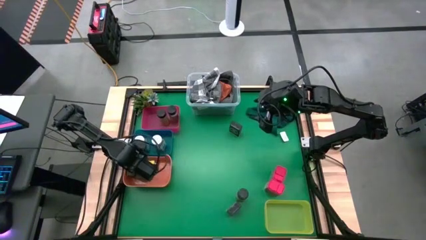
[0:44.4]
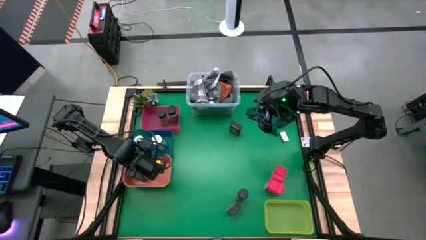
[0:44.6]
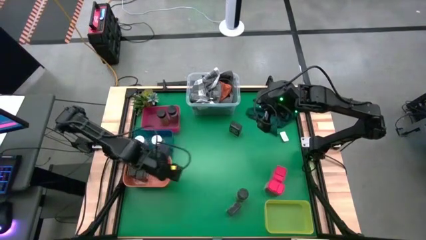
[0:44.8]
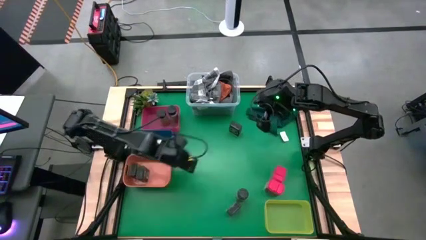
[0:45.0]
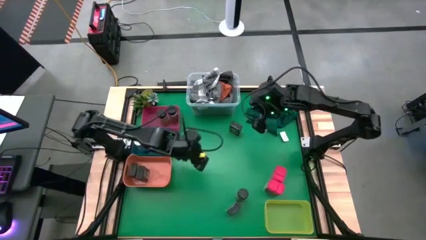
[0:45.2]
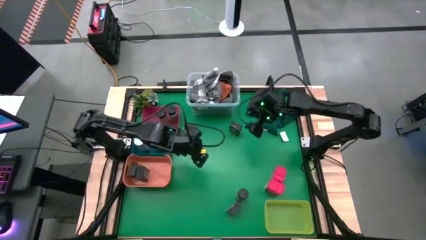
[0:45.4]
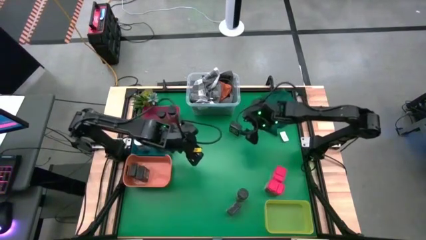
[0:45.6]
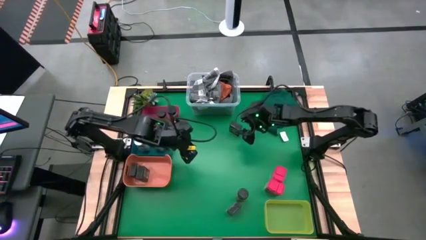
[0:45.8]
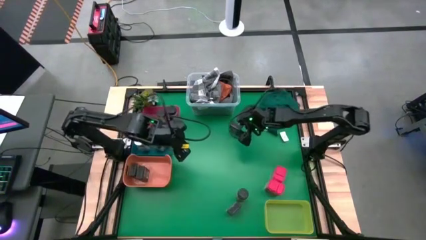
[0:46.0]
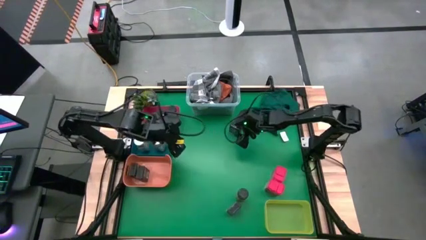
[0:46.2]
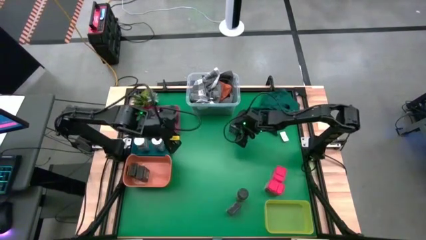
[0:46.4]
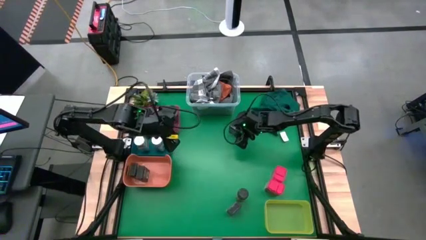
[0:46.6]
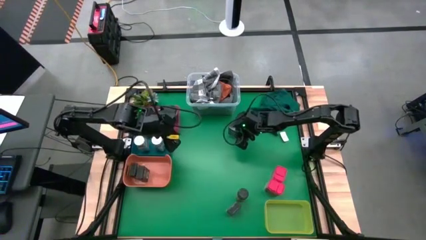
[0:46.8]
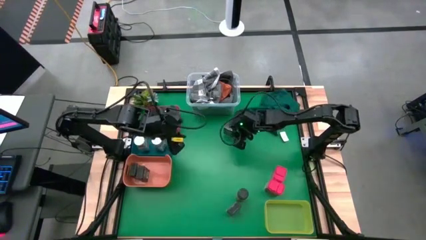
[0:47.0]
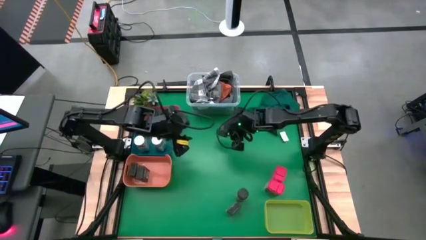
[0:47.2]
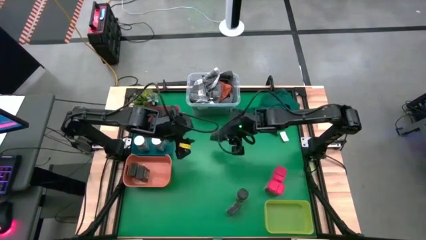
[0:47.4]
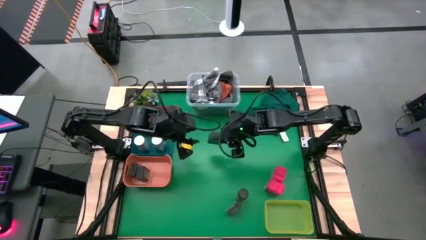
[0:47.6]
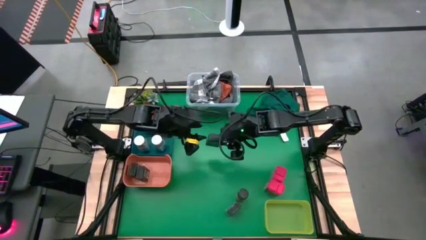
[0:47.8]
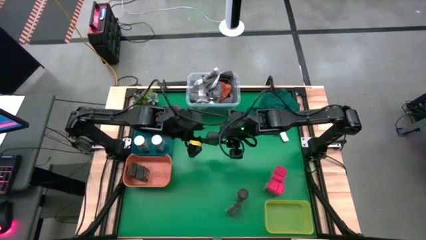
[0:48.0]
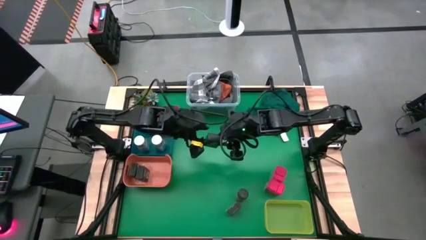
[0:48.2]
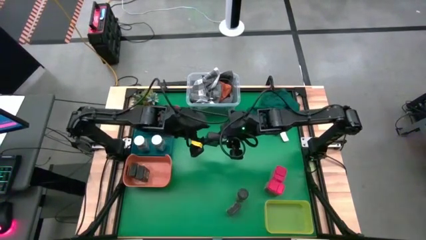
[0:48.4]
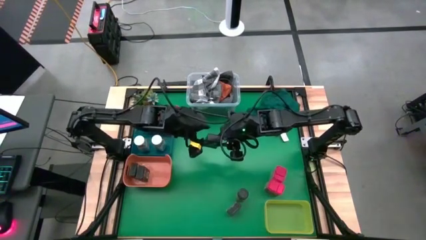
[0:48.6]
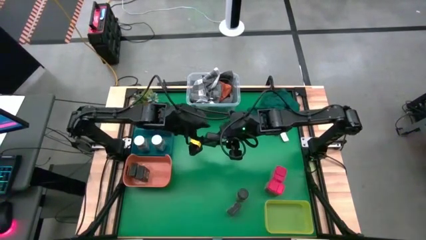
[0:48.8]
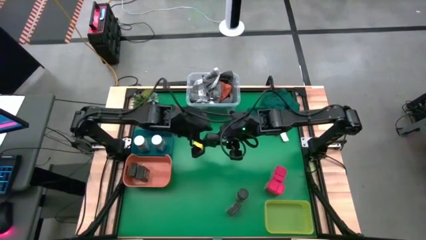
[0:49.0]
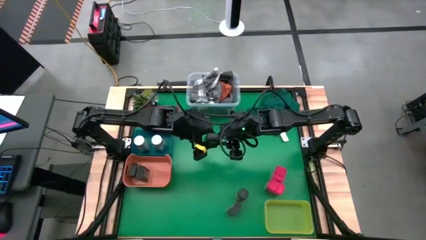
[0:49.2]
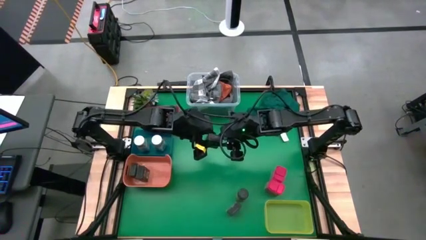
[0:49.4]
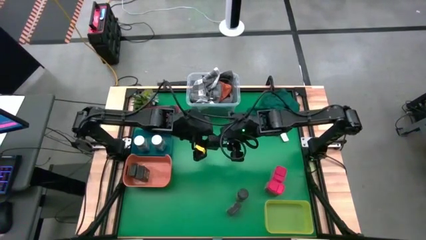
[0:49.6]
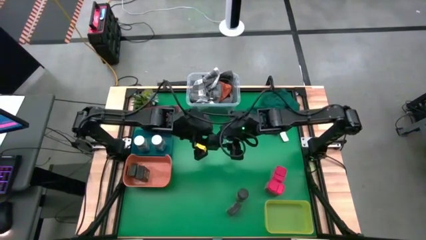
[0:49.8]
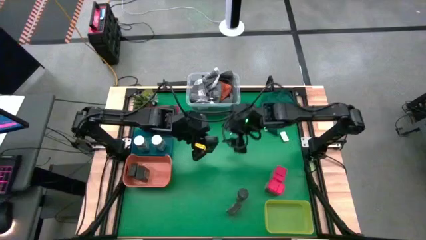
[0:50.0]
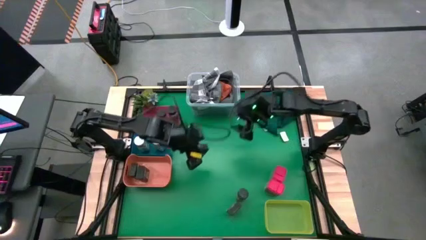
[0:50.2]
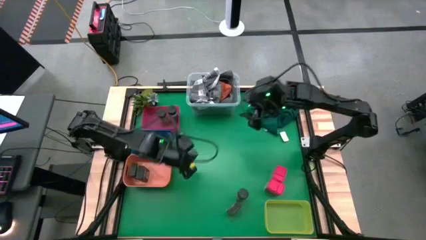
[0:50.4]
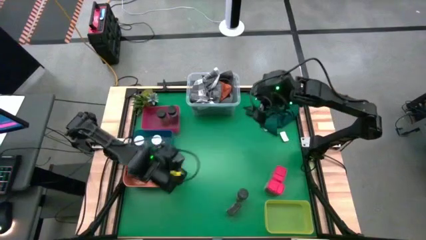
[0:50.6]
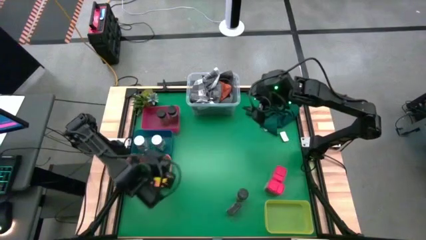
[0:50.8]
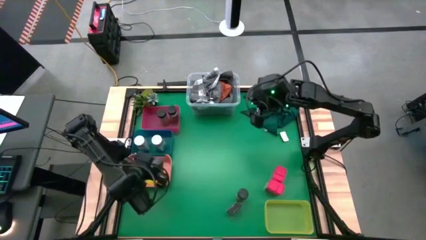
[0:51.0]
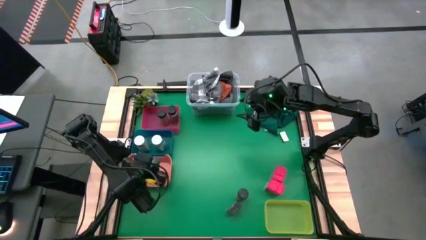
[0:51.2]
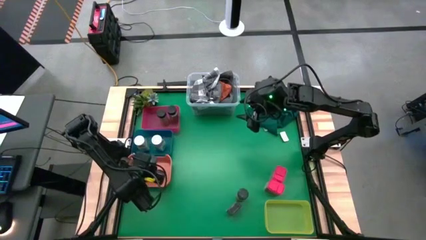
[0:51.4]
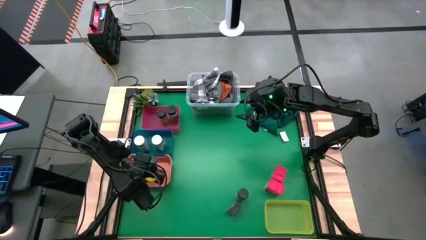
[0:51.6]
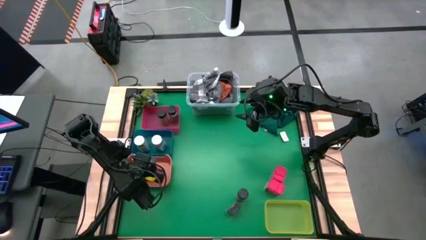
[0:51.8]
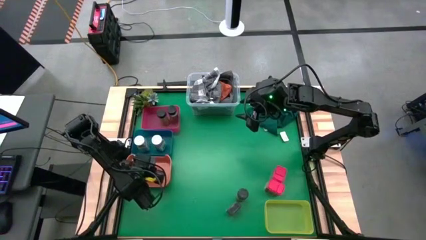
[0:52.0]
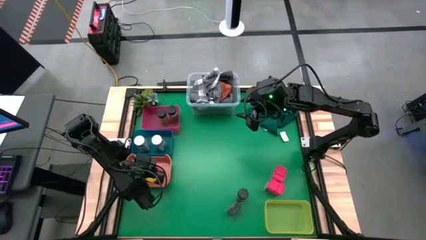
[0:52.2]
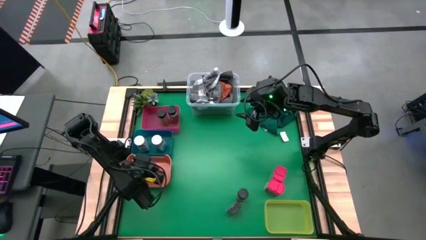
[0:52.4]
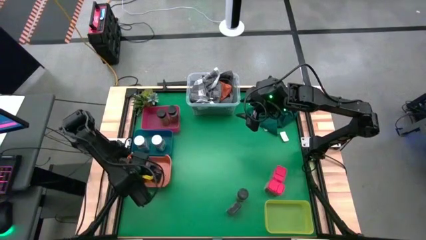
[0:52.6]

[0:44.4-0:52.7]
Task: Sort spices by type
Put the top black spice can into the orange bin

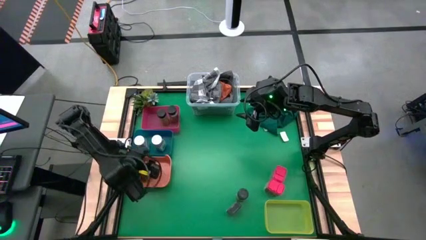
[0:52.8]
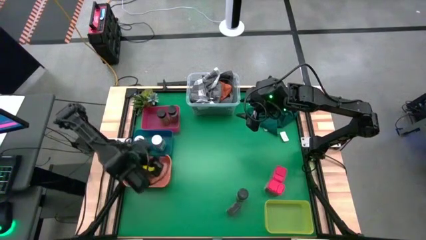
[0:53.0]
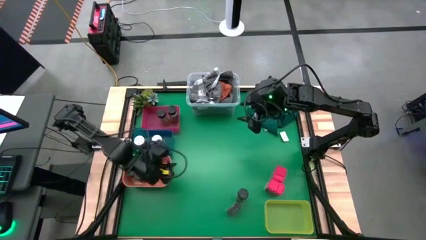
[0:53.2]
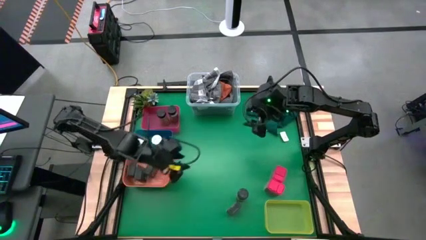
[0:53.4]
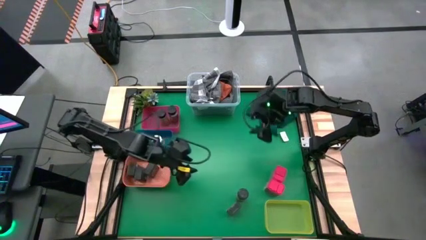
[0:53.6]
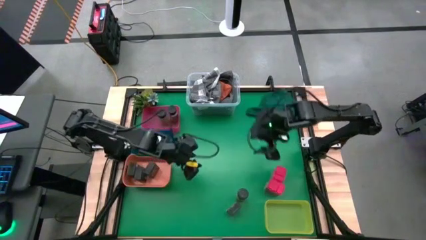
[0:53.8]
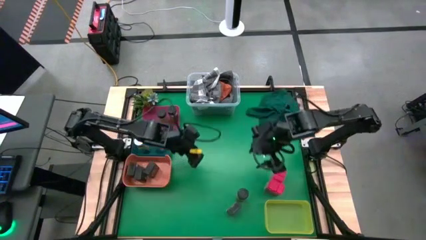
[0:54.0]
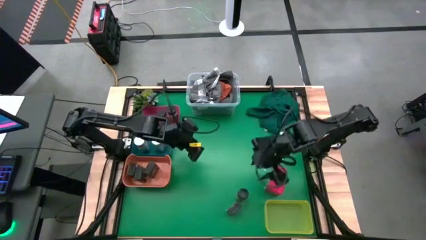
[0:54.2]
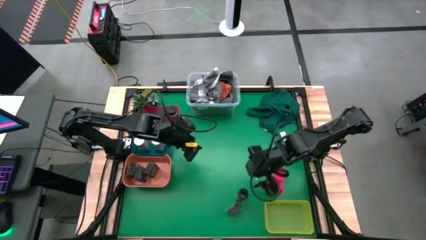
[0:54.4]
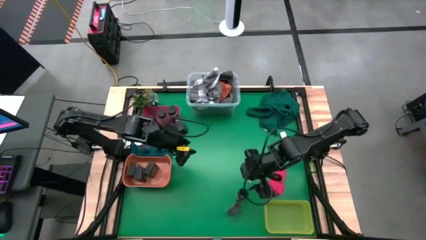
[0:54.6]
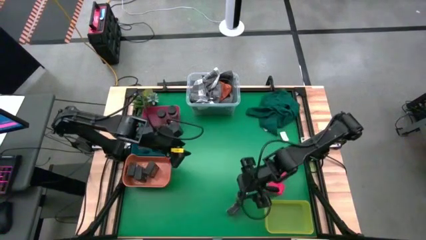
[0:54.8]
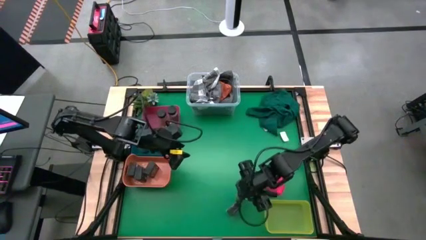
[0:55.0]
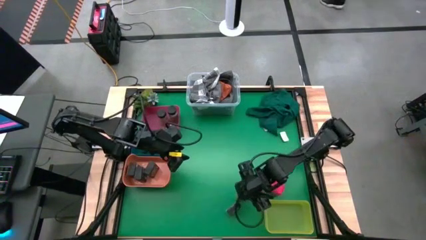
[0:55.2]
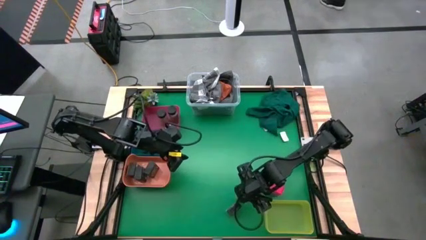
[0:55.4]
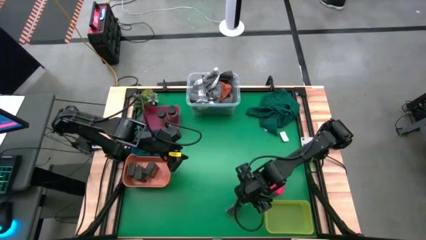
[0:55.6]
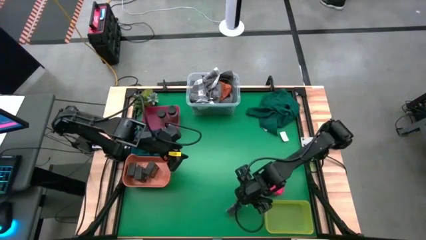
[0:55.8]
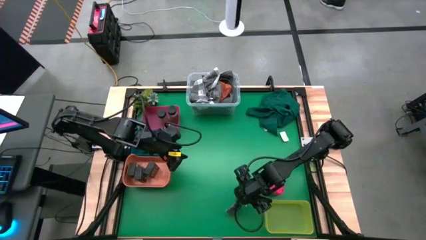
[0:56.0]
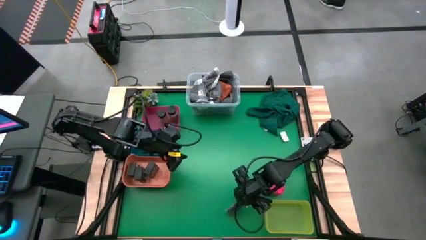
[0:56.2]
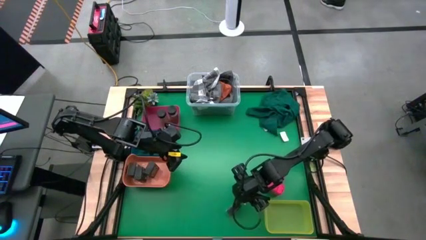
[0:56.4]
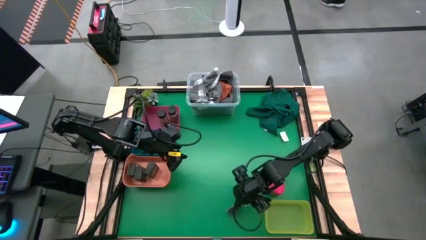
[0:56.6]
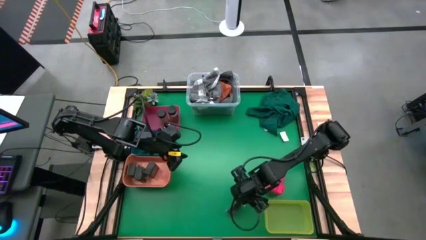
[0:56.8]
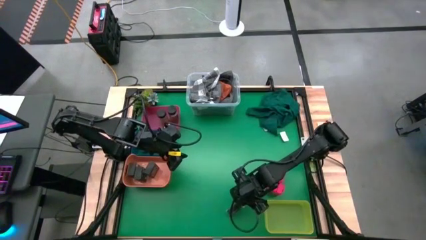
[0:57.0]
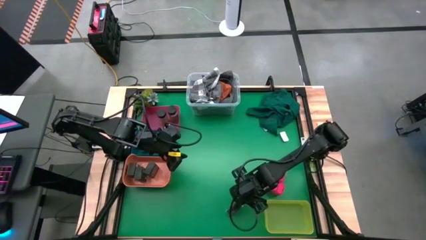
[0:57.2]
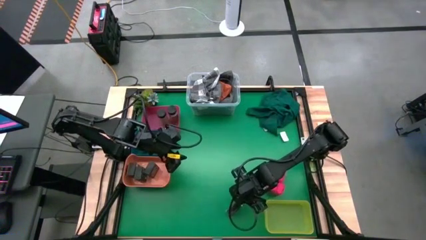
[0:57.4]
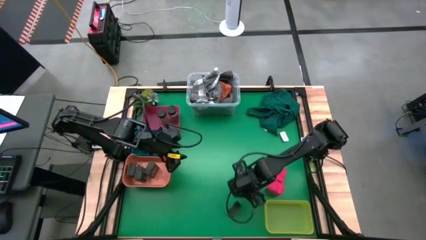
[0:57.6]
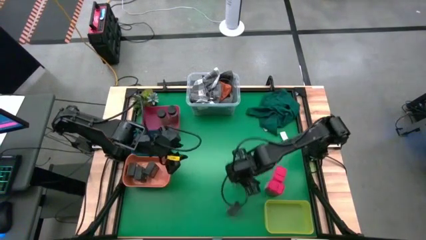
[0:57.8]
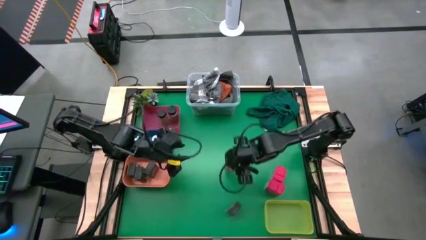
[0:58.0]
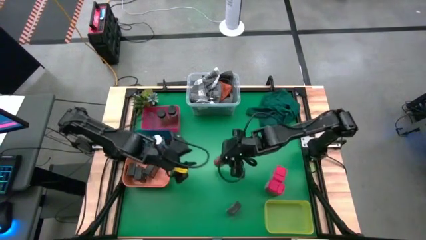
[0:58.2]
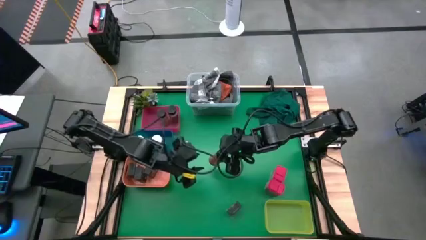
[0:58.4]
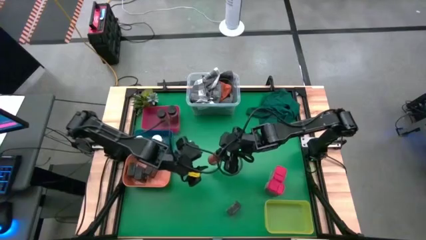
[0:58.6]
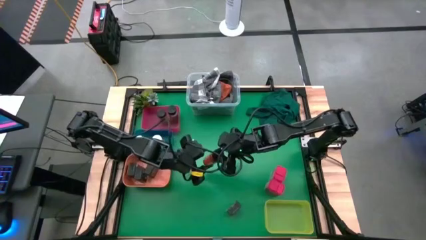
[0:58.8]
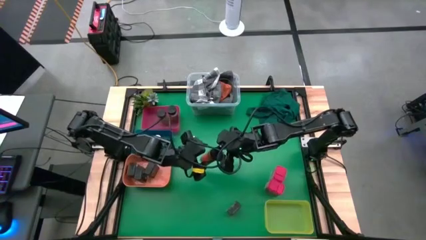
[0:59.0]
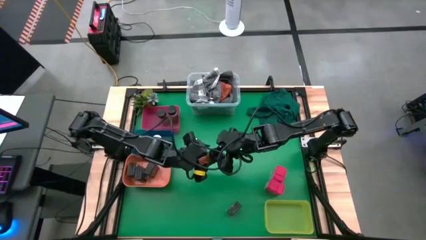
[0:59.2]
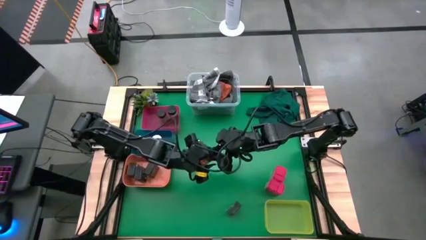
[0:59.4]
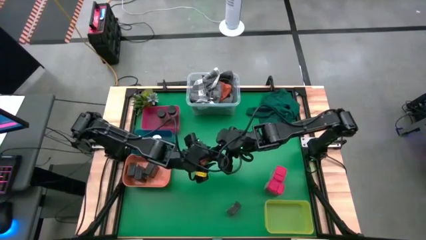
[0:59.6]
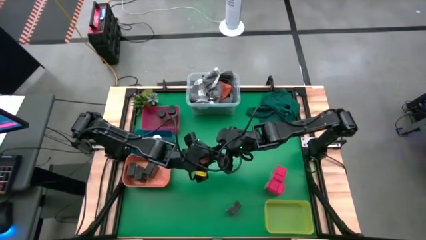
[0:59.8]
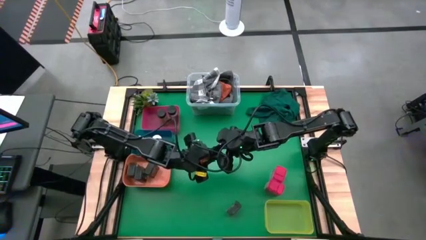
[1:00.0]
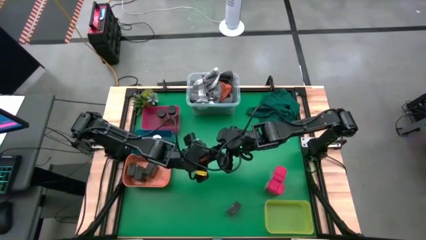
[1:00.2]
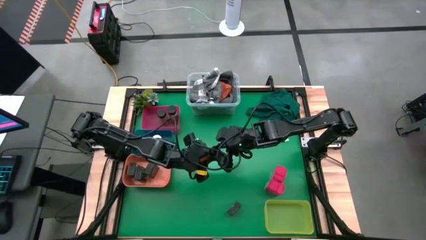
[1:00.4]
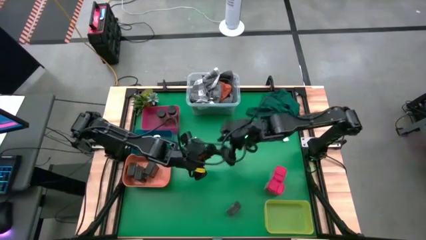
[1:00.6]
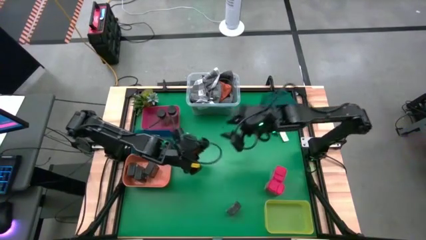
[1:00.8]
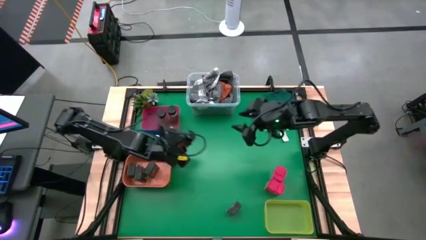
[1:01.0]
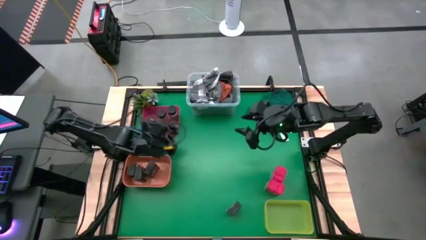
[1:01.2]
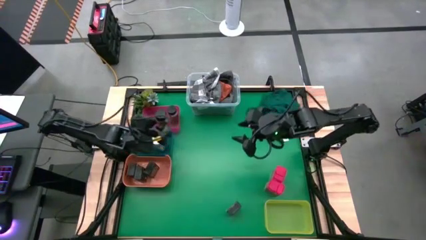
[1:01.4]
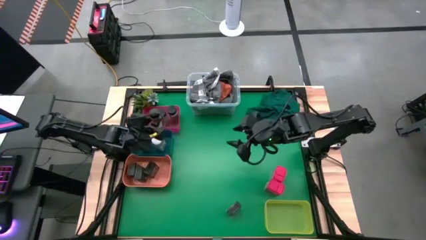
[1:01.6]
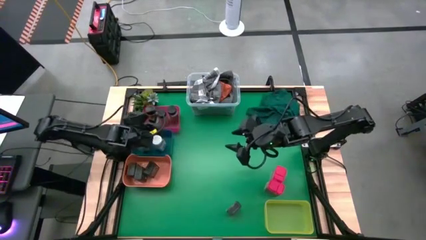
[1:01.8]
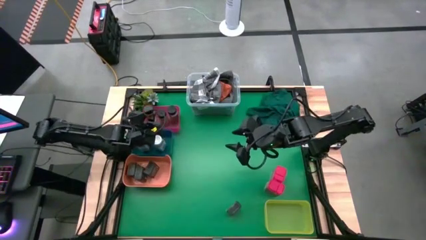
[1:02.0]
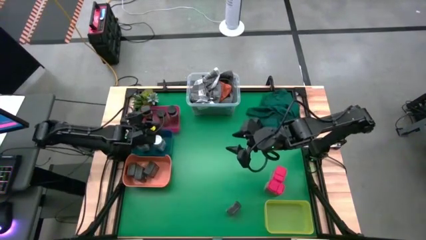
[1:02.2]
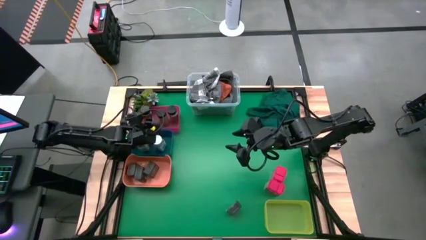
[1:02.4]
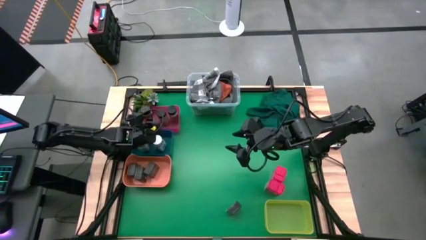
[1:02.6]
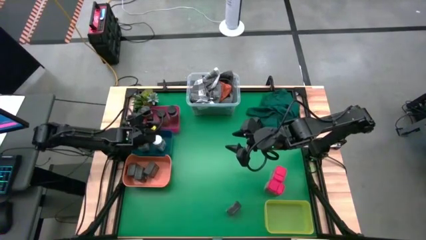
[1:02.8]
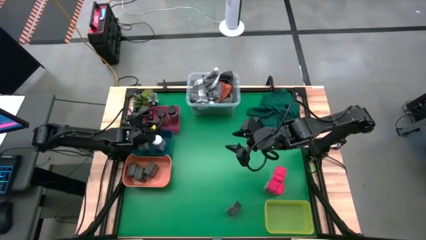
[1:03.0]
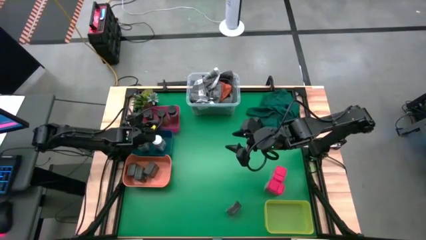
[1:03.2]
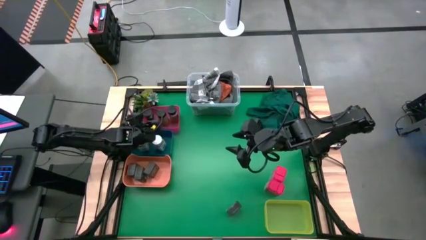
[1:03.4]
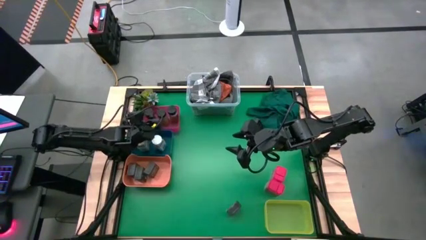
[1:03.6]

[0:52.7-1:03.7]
Put the black spice bottle into the red bin
